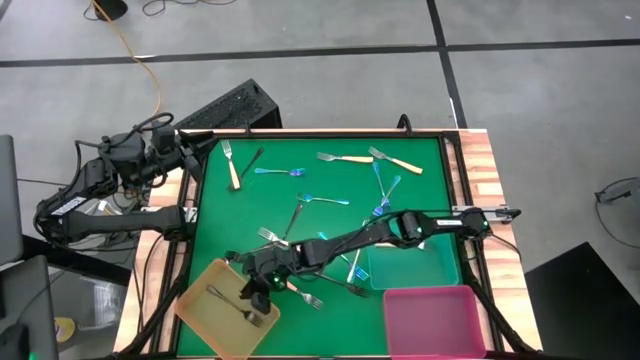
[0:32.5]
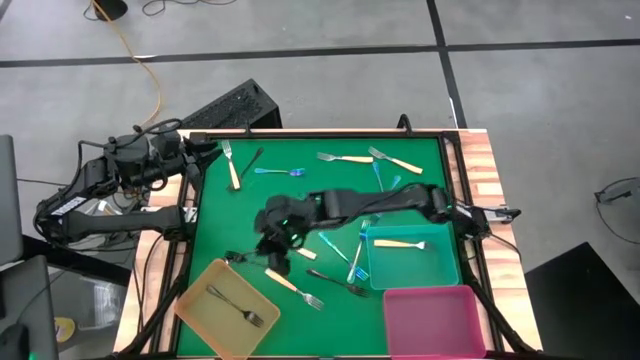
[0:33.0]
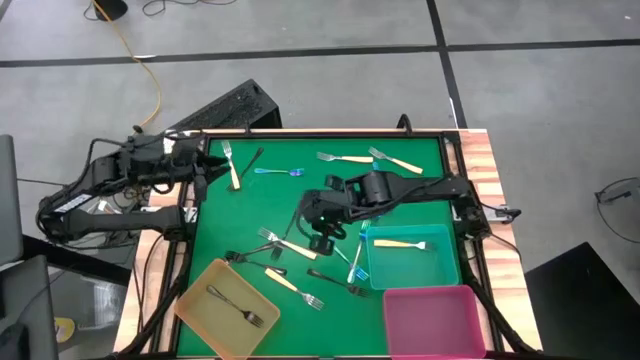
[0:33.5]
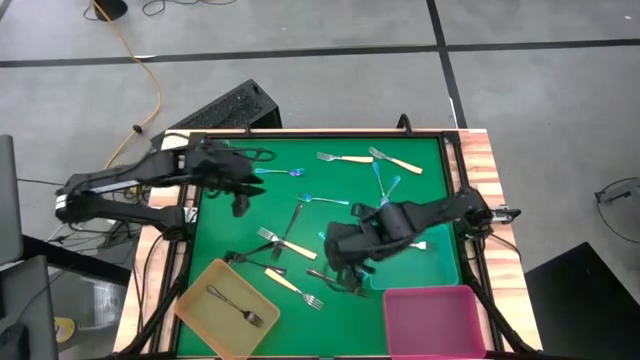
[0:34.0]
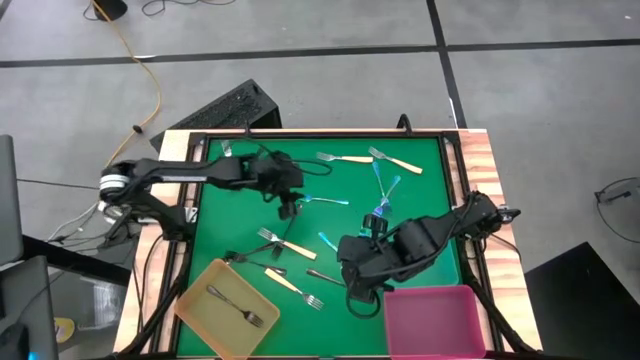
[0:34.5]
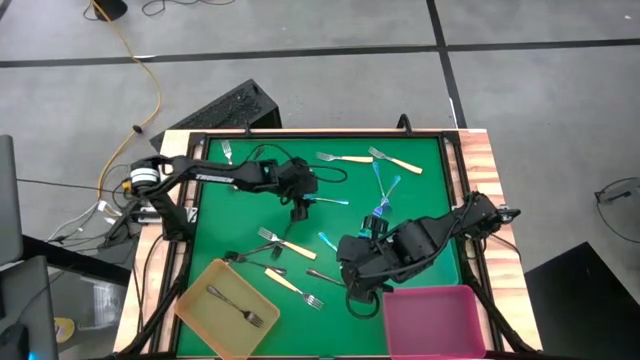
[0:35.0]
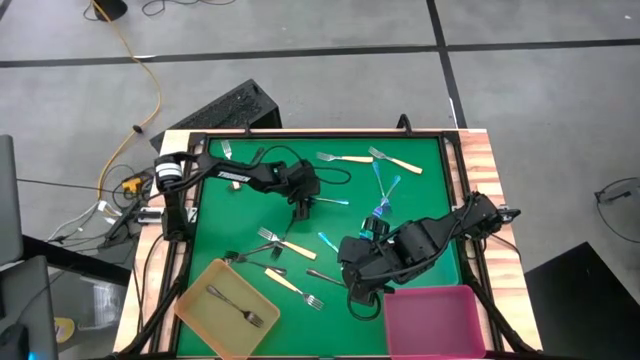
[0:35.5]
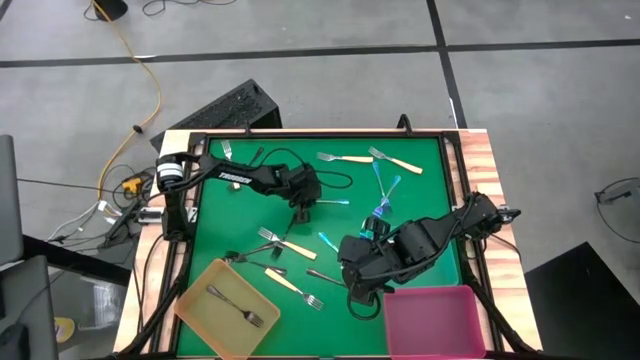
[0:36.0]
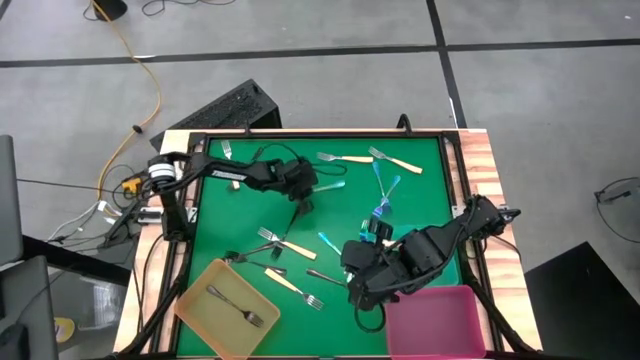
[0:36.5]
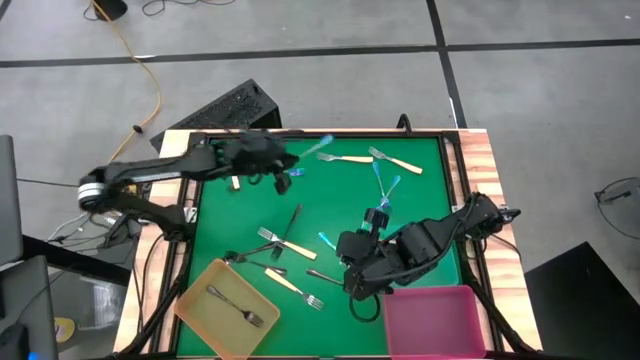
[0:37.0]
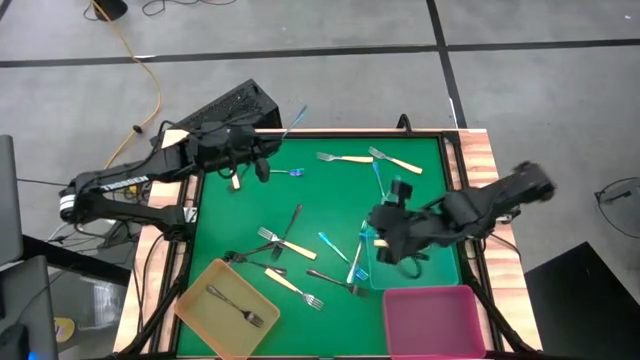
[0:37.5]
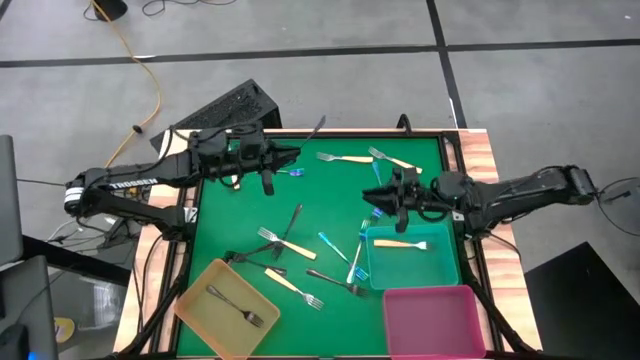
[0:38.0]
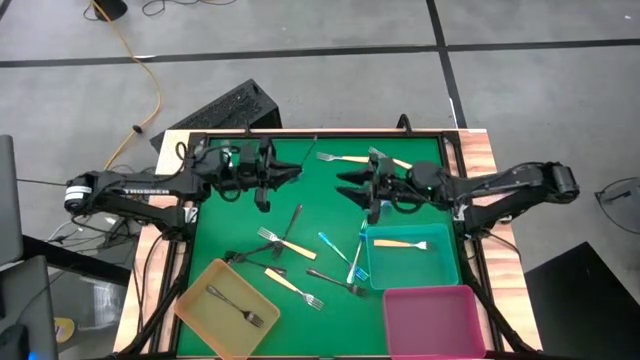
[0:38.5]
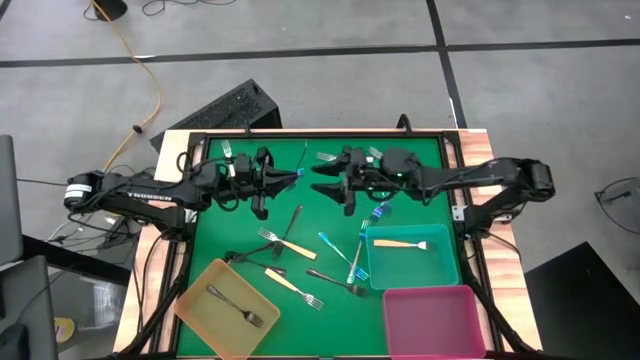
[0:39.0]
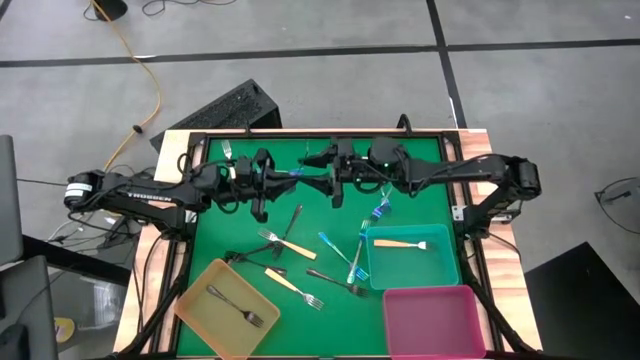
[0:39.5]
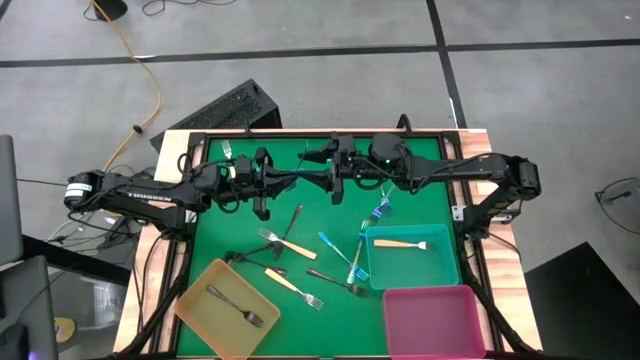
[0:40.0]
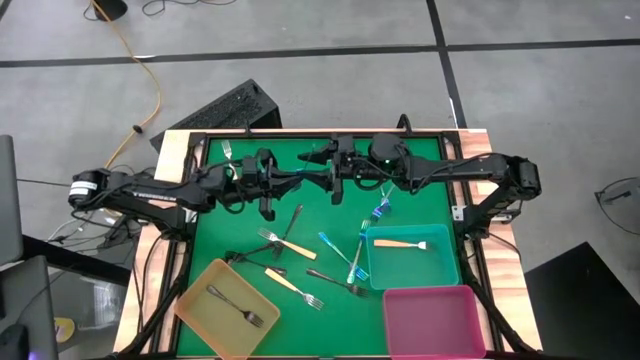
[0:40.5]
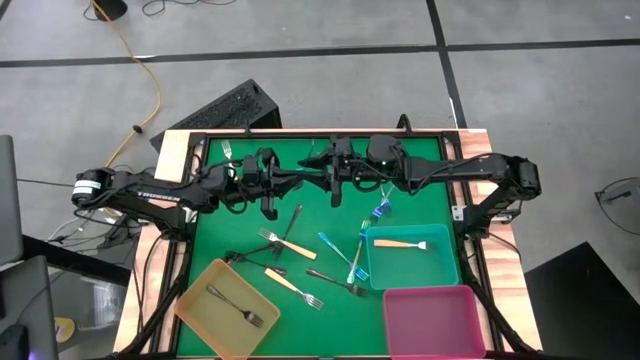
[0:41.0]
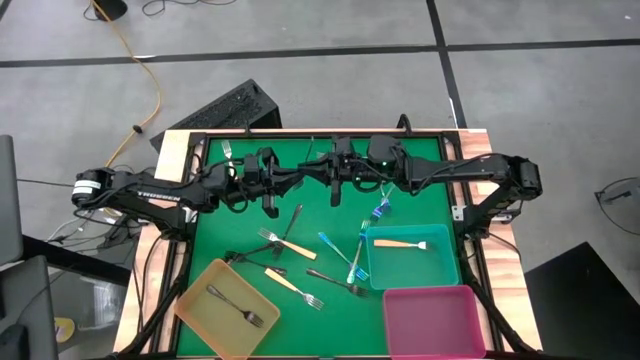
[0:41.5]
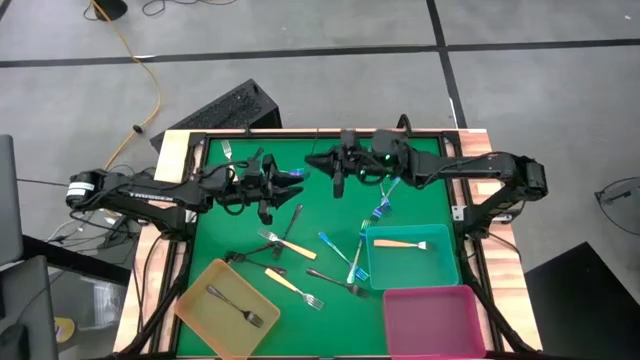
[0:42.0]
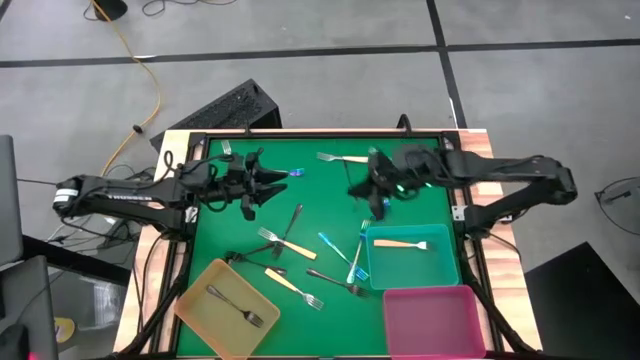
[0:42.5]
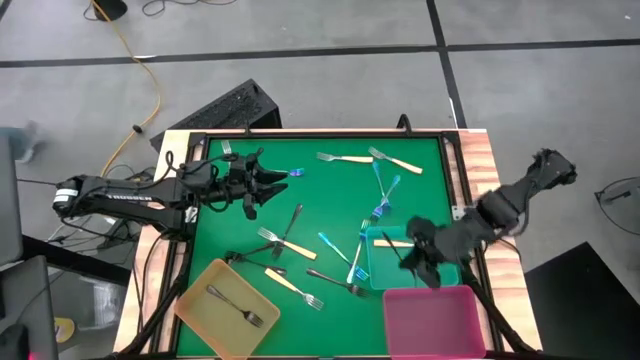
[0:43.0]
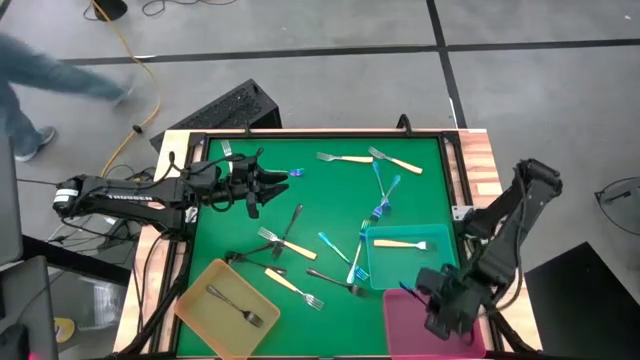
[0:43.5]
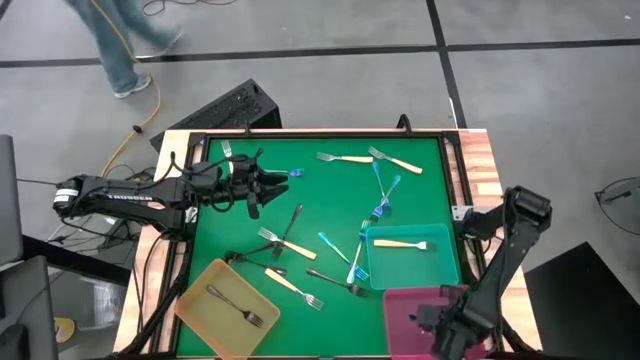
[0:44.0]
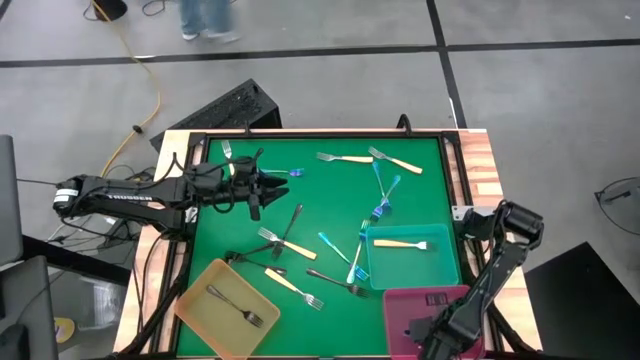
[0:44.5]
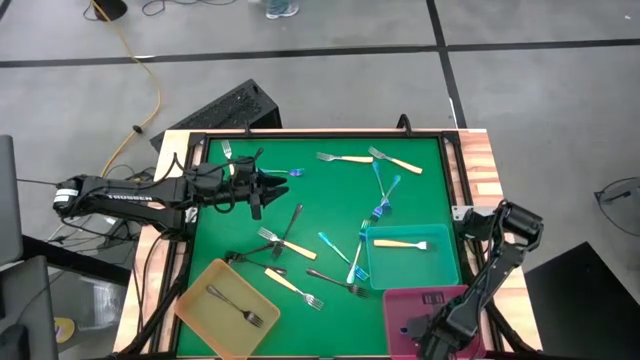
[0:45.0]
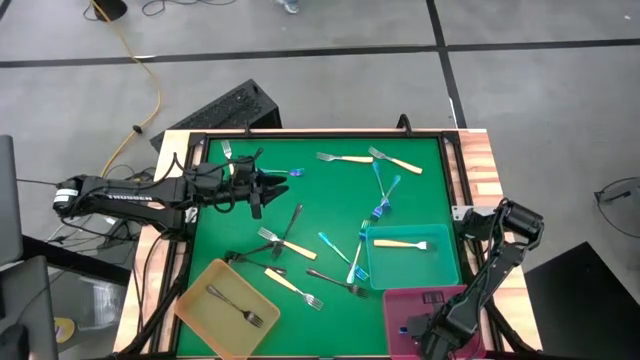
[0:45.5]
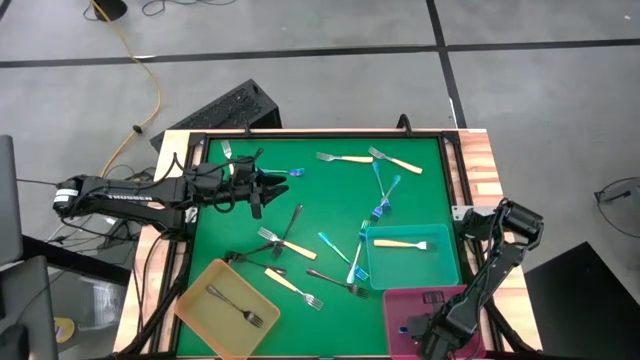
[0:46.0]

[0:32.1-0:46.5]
Task: Sort silverware by color (type)
Put the purple fork into the pink bin

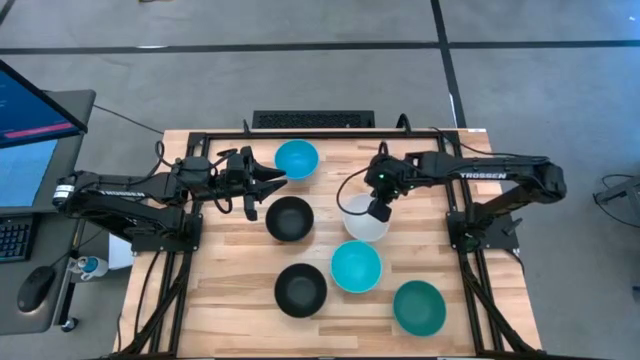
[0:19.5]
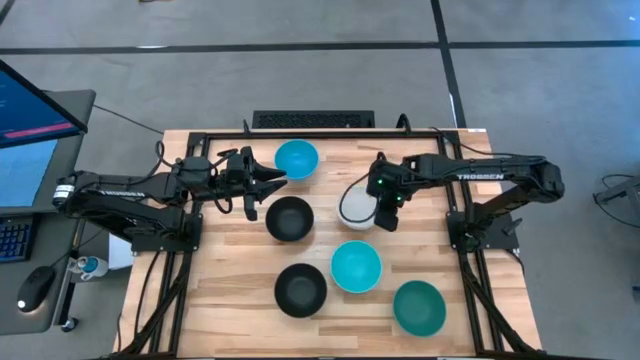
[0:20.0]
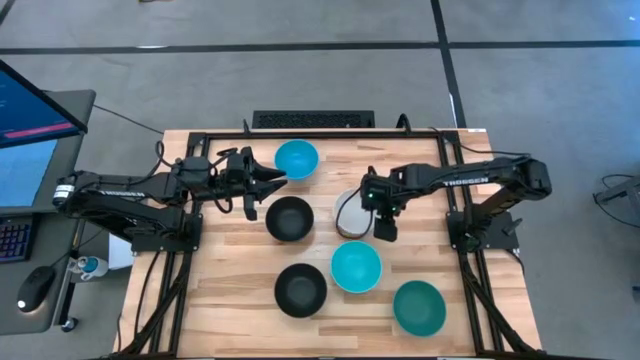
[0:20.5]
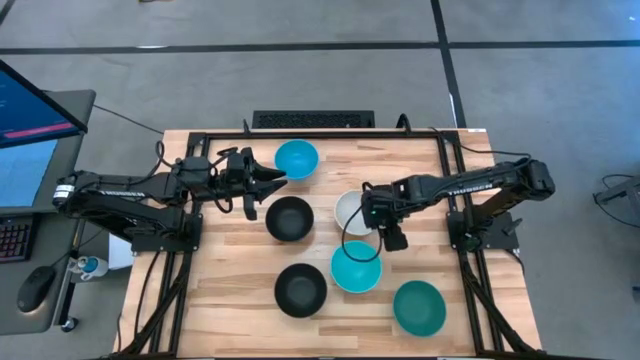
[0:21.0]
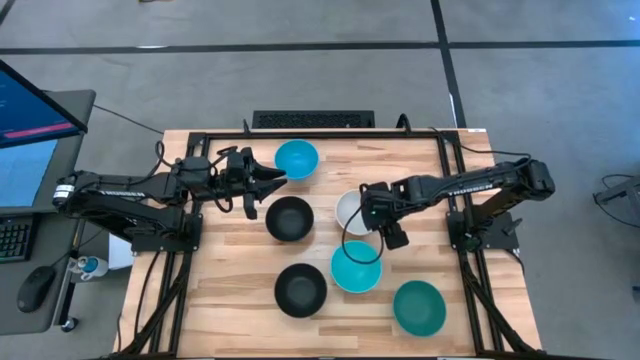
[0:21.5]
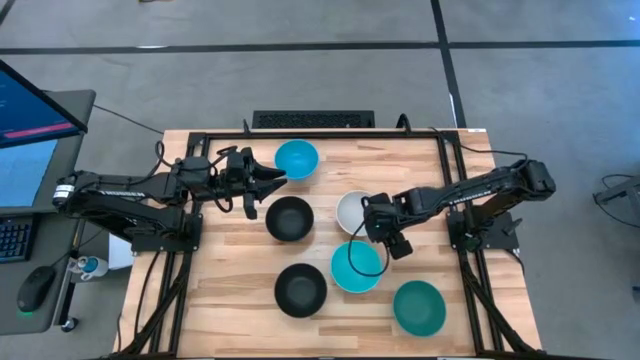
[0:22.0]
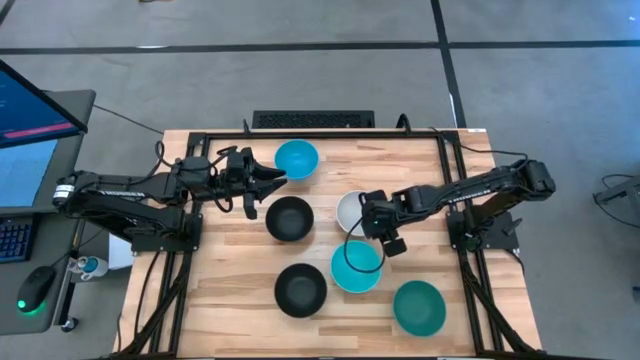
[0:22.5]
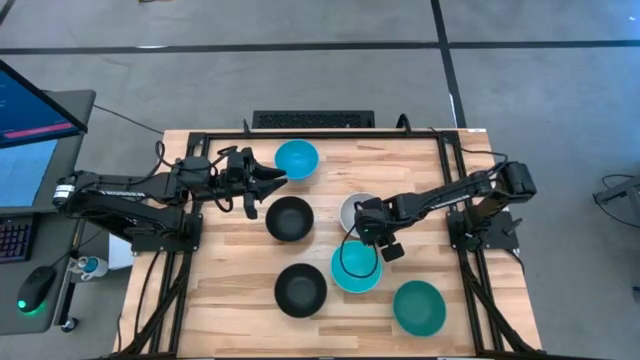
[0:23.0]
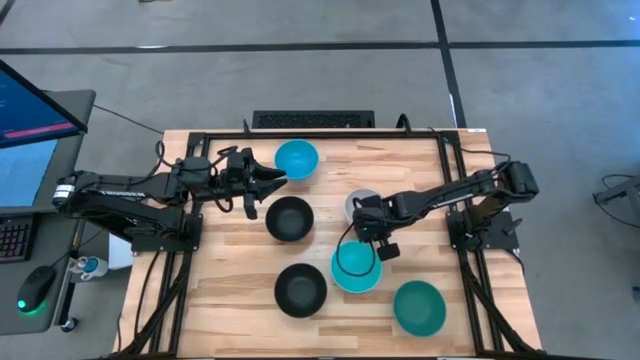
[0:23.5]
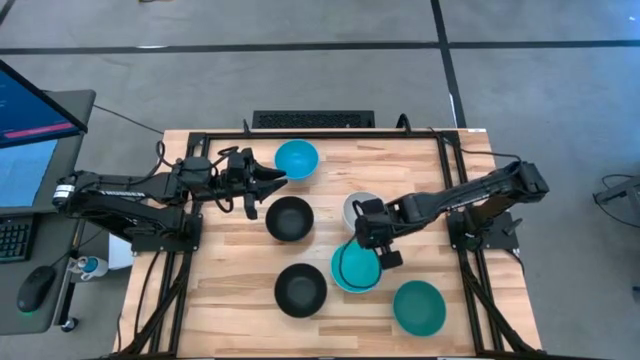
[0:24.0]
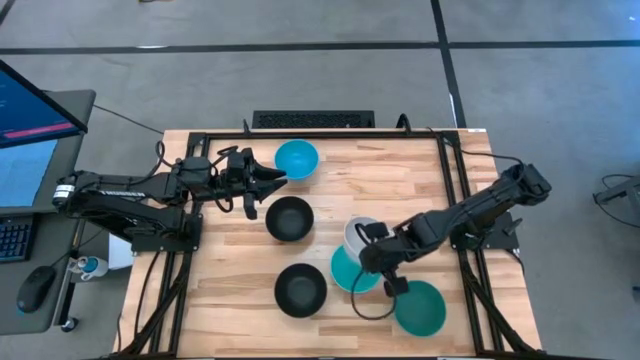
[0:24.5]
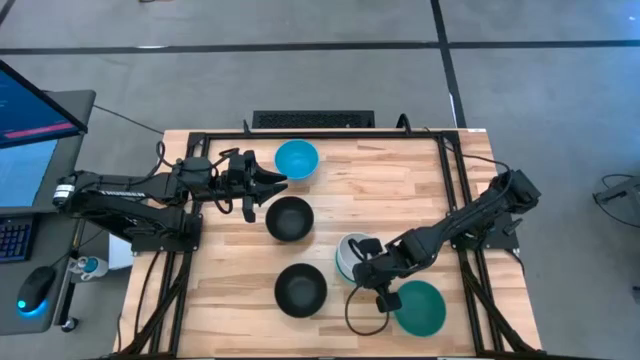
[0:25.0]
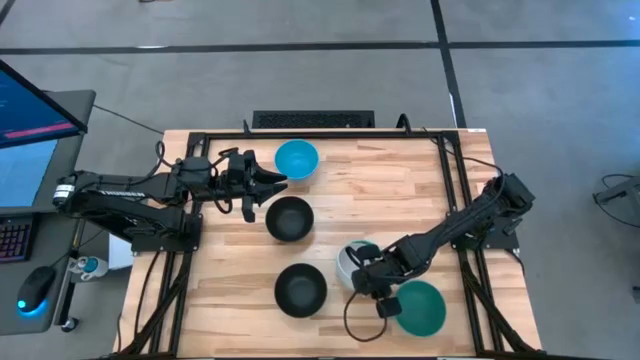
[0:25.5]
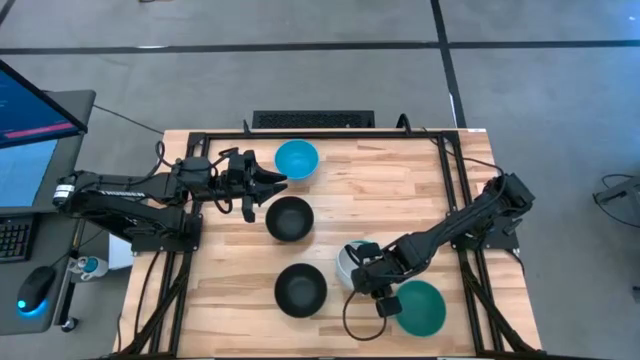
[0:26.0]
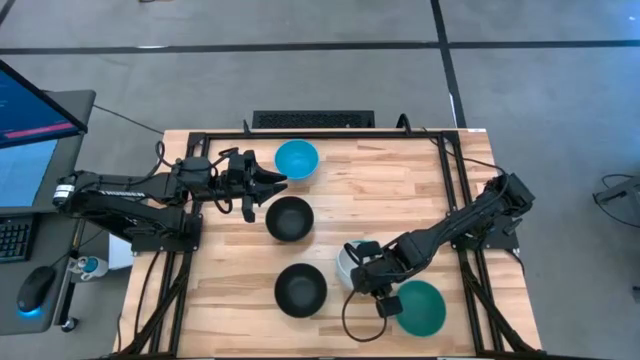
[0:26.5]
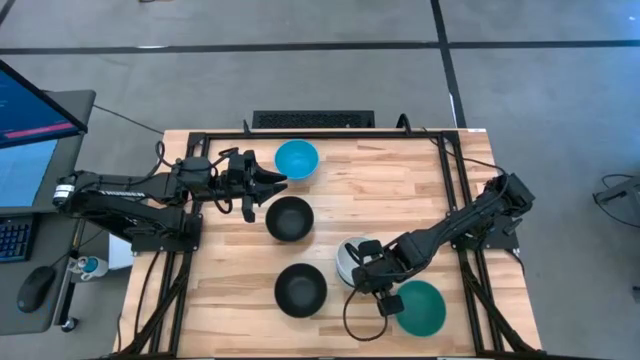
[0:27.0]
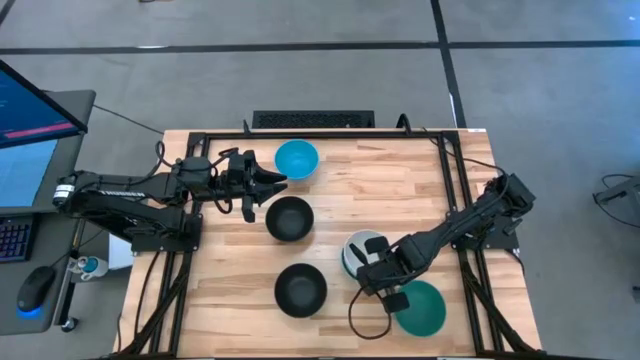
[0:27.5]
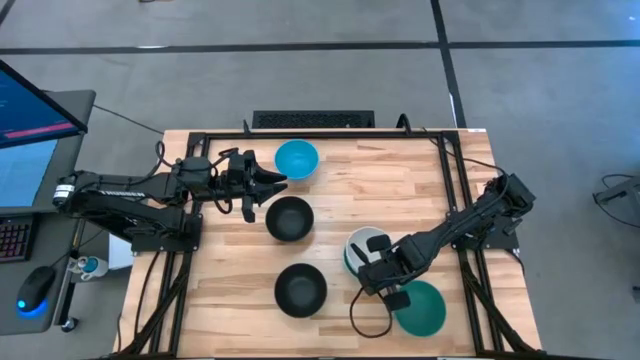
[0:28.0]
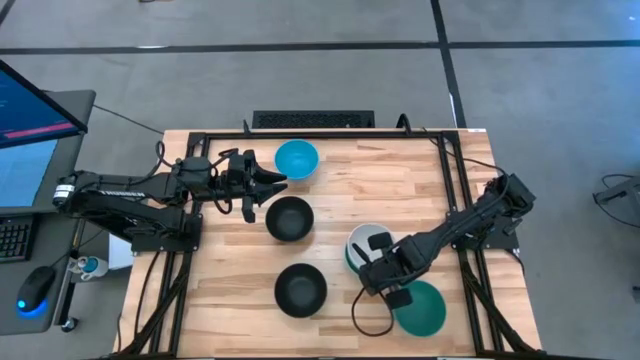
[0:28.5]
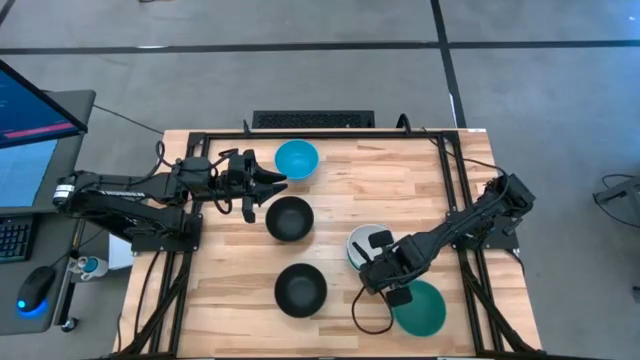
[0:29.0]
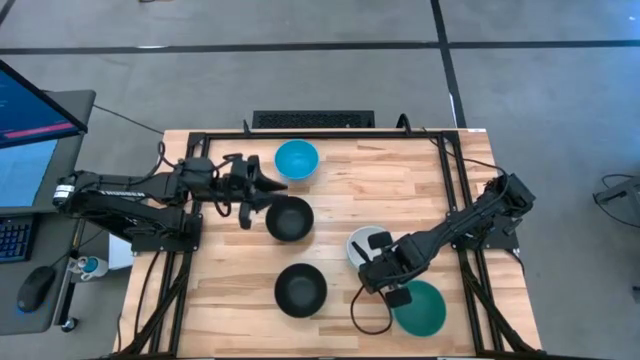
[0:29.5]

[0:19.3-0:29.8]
Task: Nest bowls inside each other
Stack the white bowl on top of the light blue bowl
